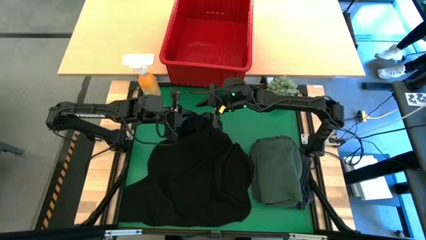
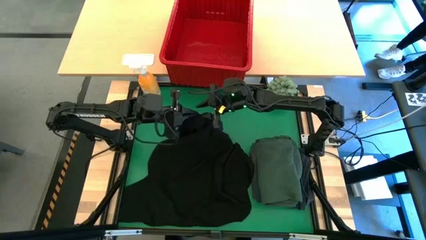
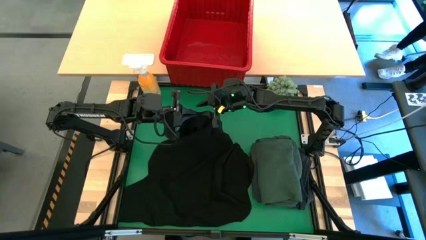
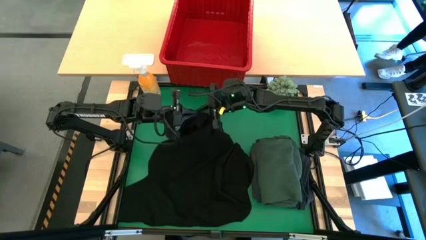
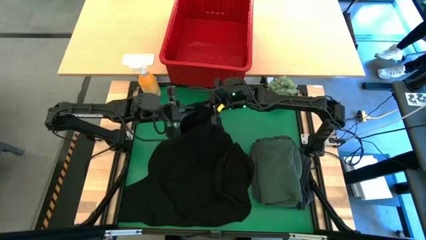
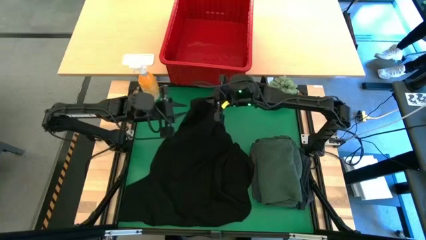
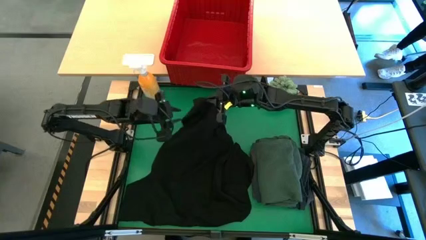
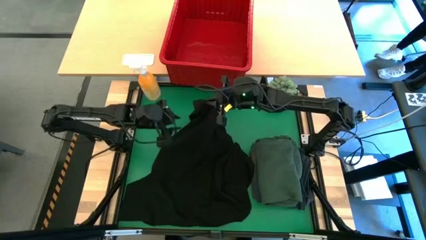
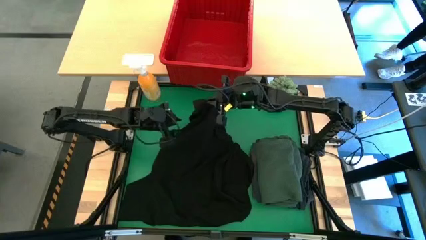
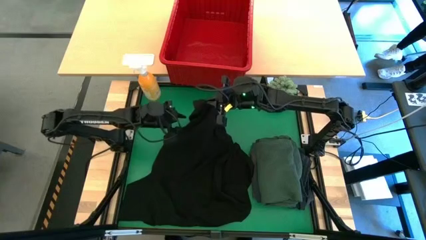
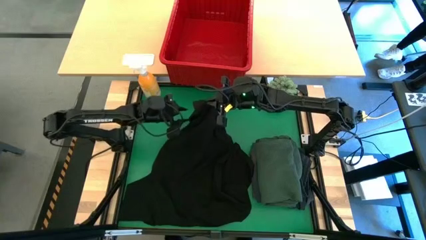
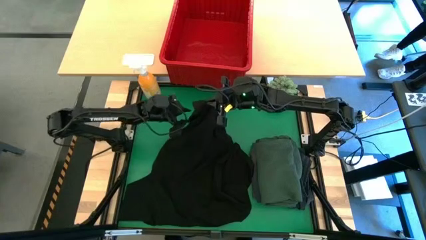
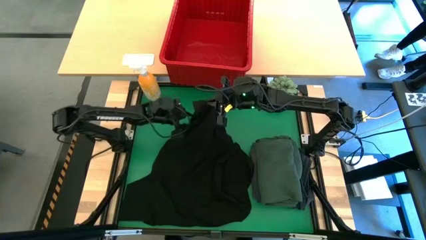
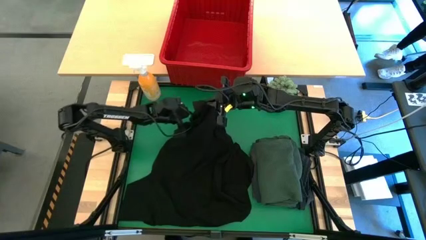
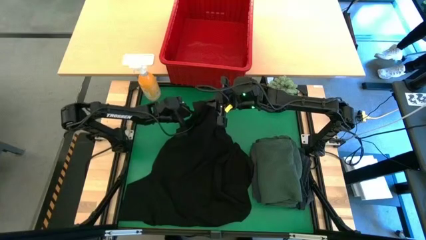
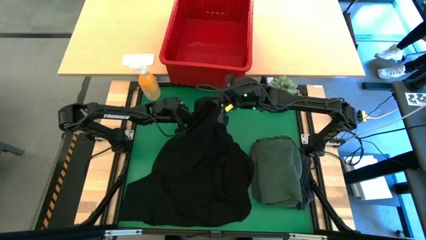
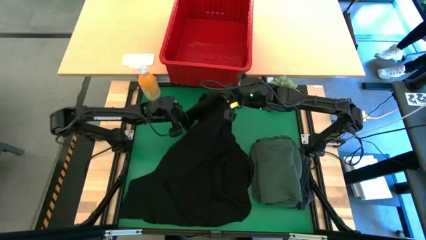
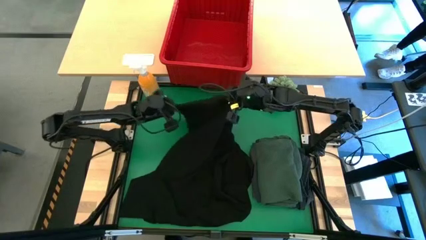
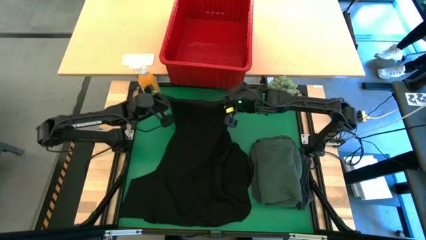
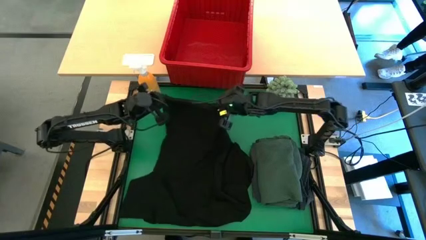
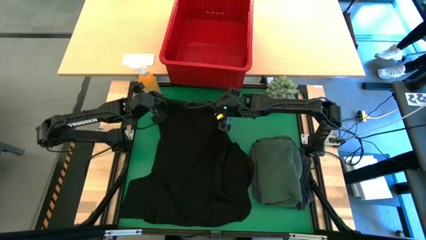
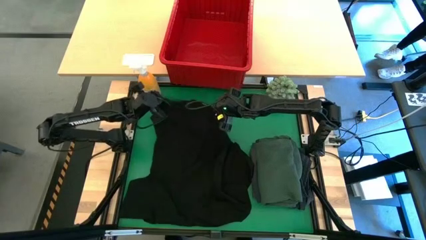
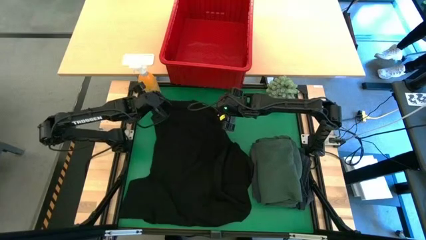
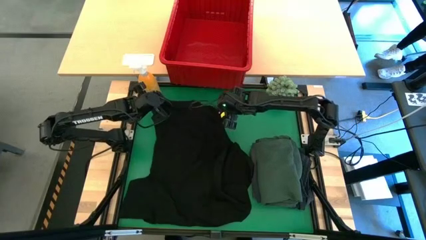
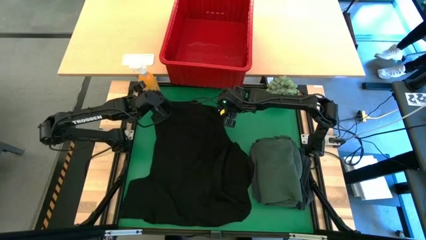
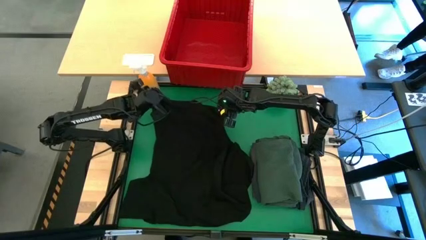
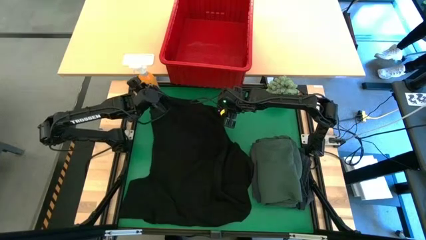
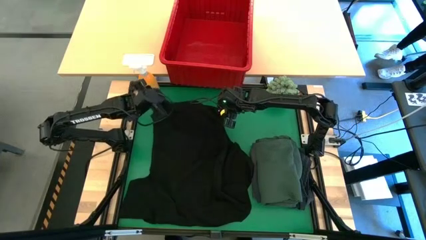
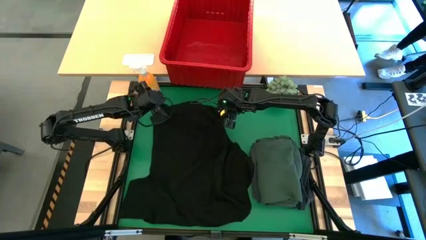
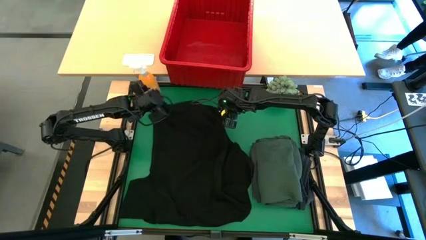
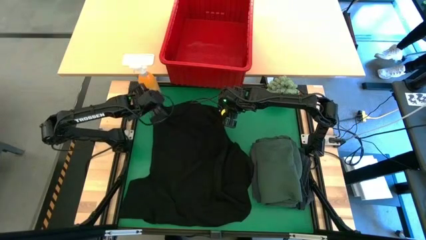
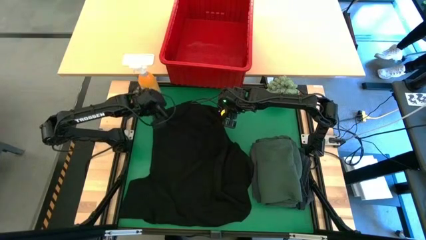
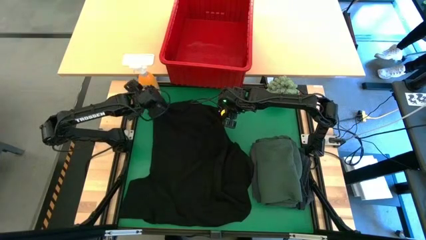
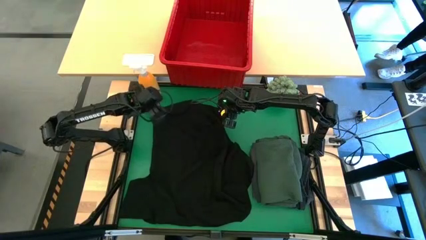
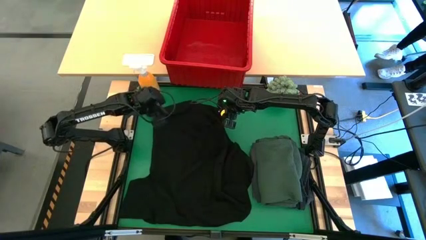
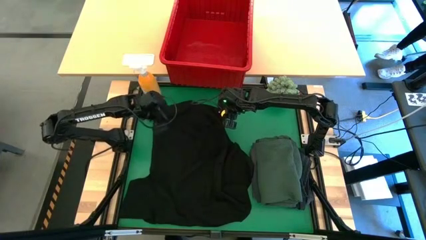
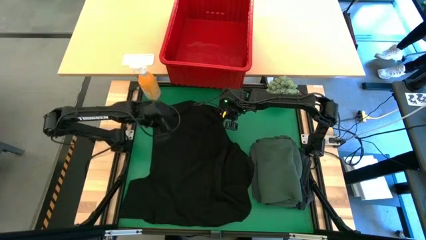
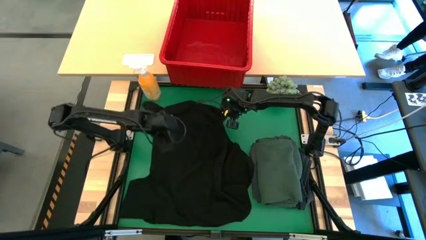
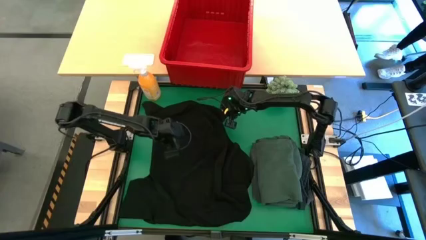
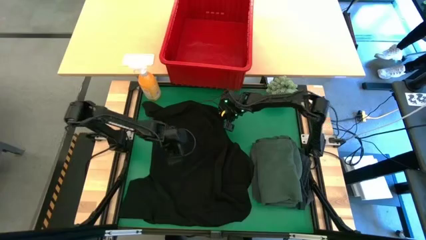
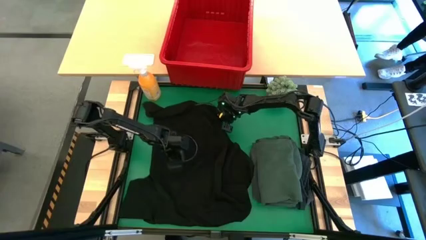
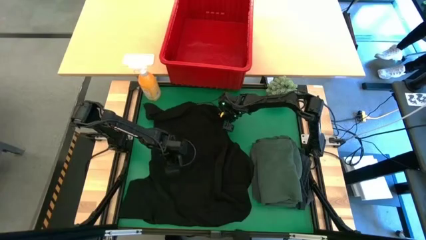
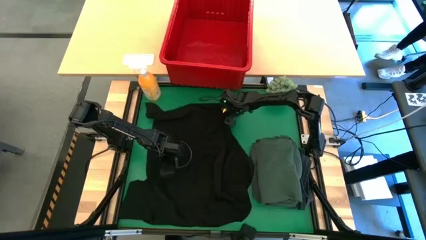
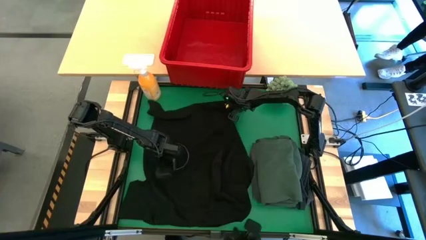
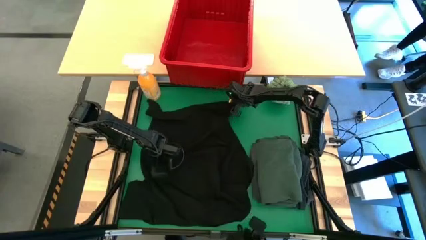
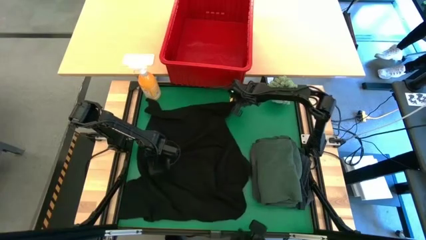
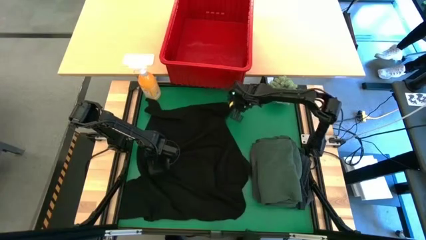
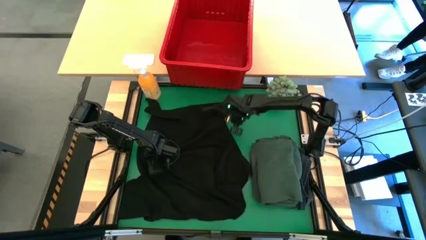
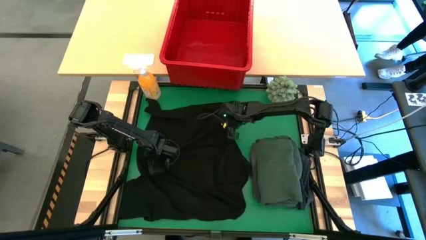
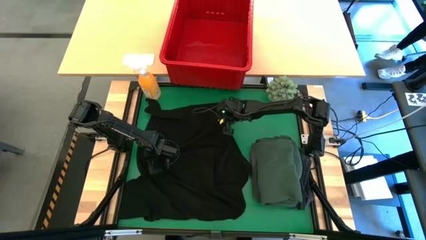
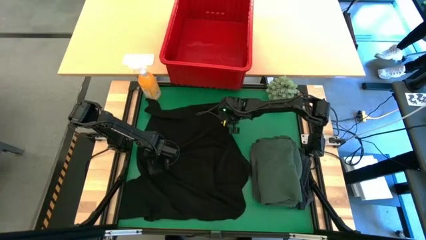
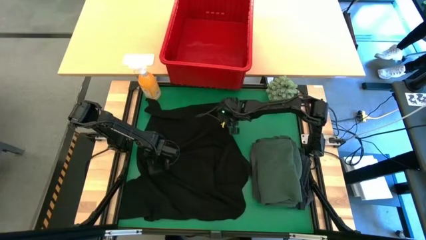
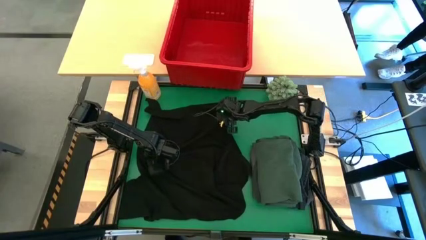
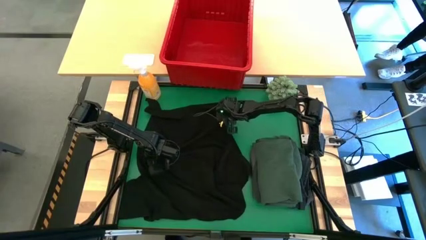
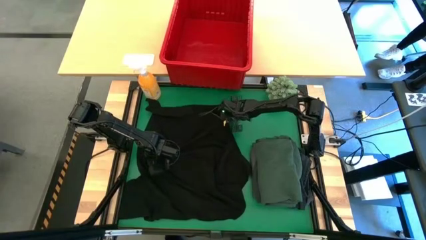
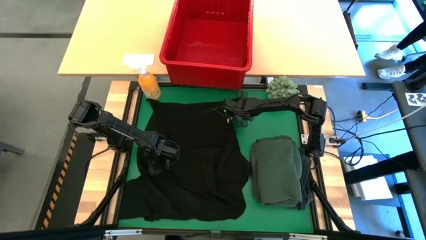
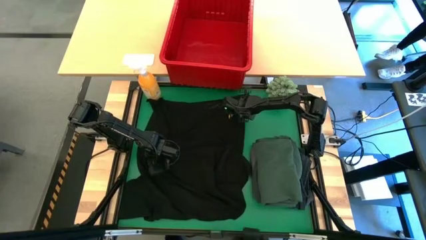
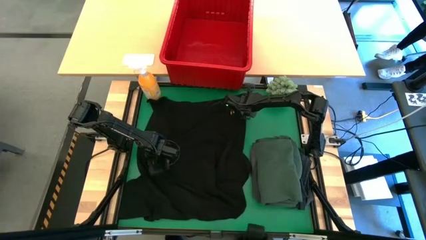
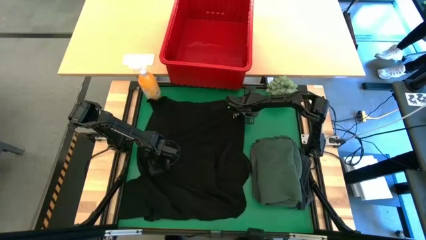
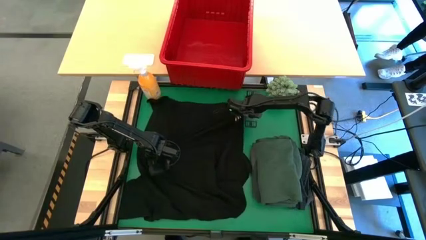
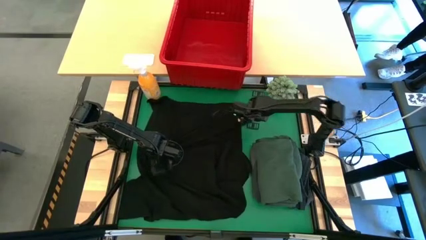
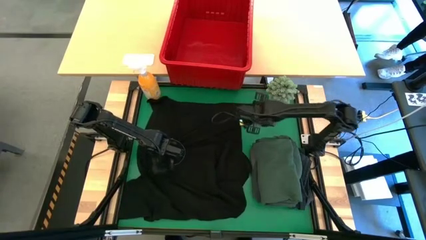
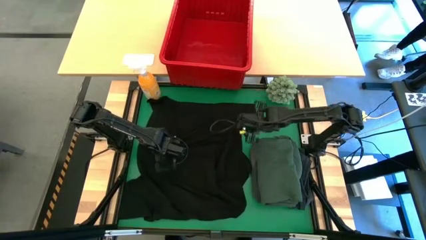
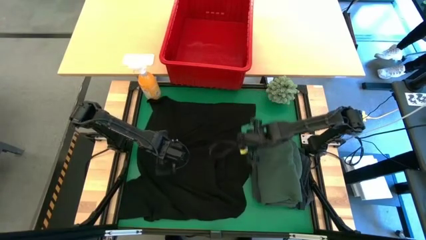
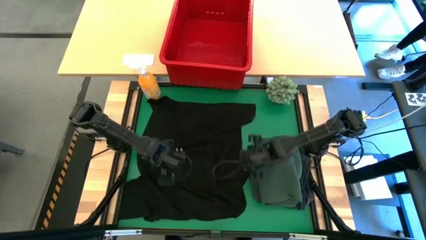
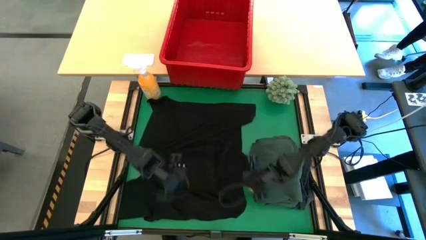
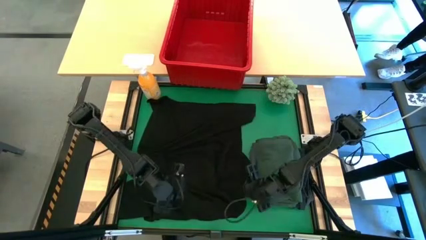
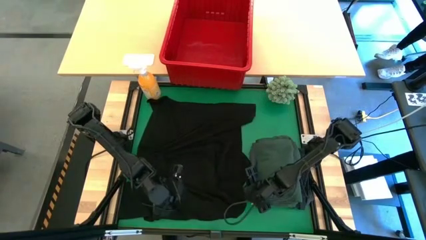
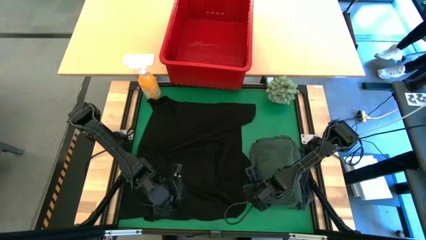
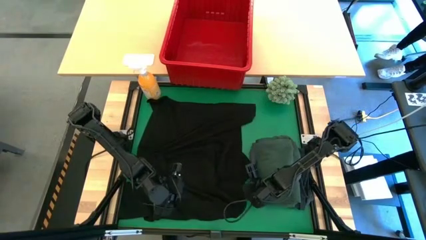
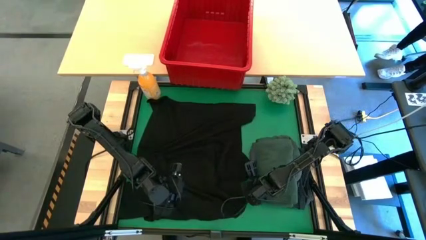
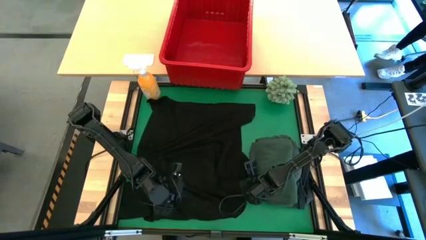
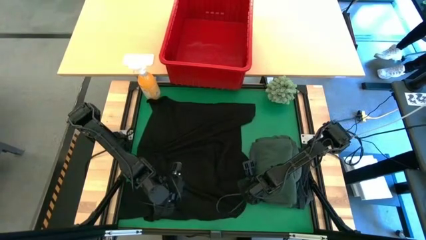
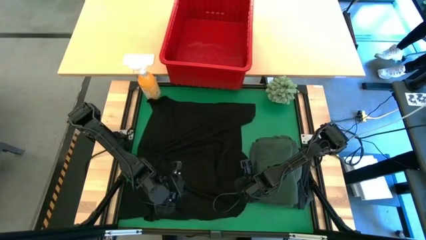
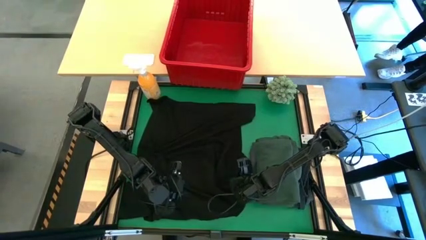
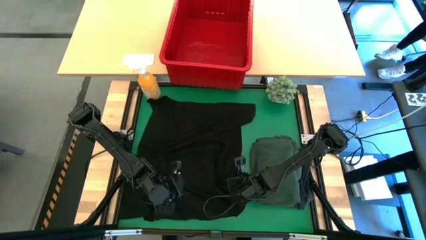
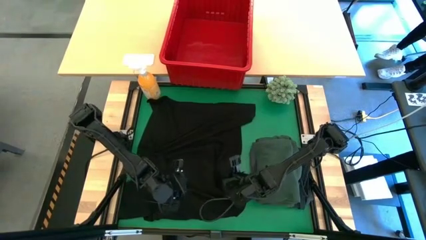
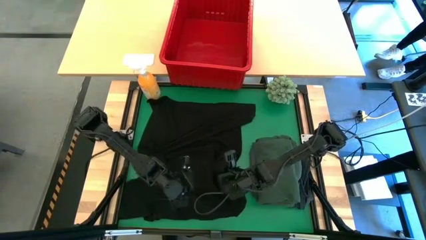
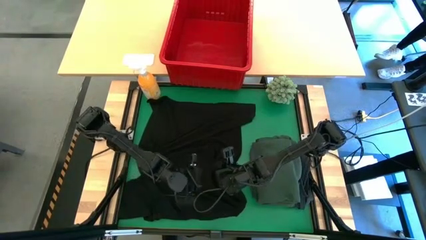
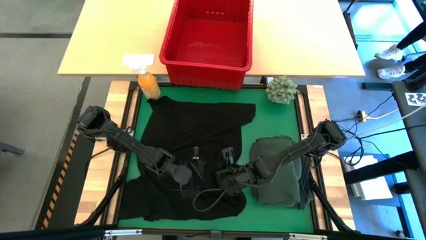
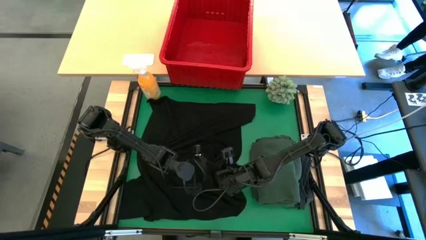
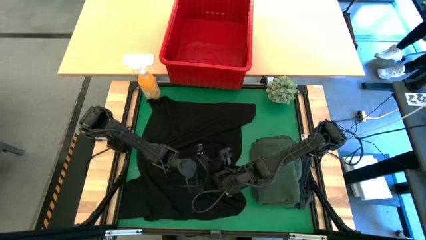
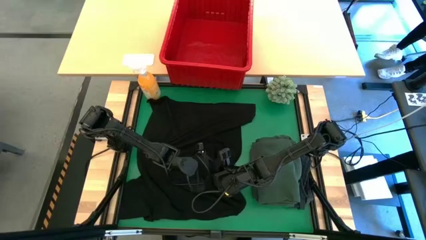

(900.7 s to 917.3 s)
Task: Fold Laundry from Bin
Fold the black shirt
